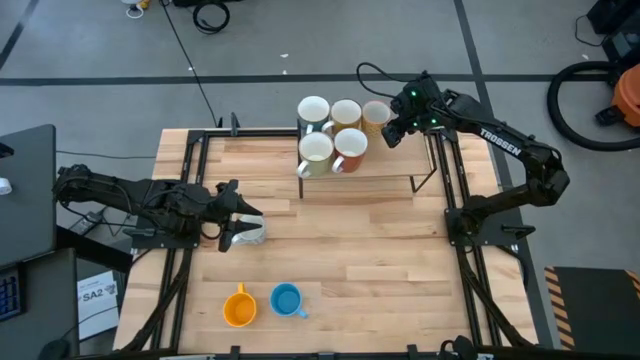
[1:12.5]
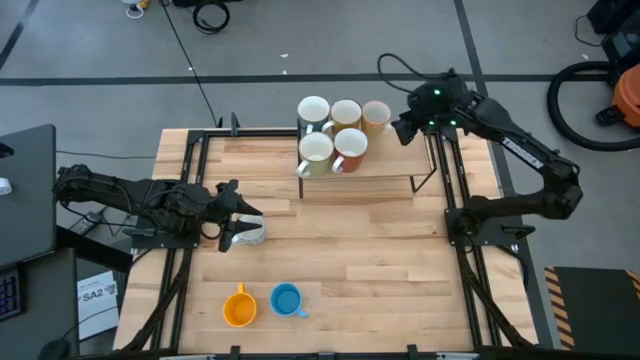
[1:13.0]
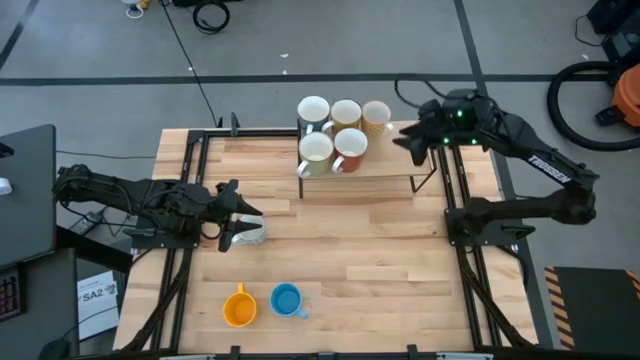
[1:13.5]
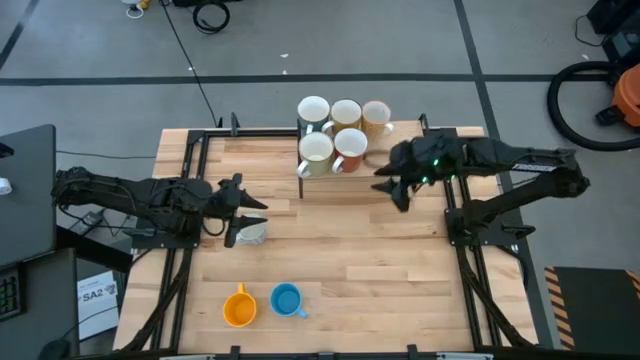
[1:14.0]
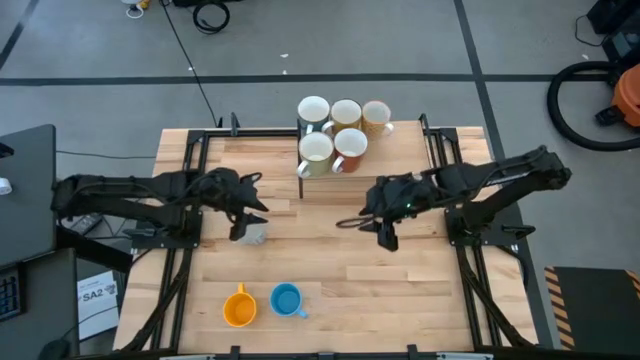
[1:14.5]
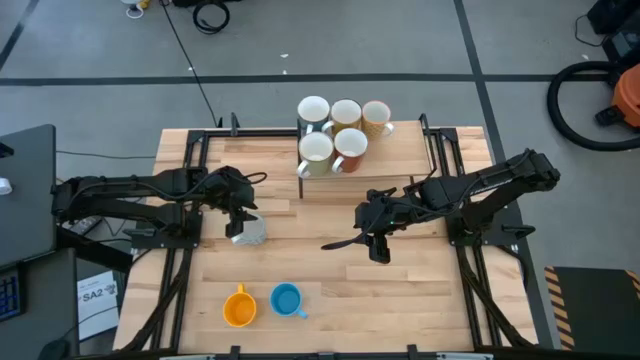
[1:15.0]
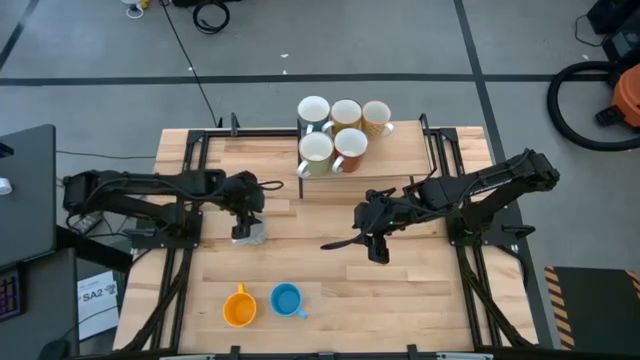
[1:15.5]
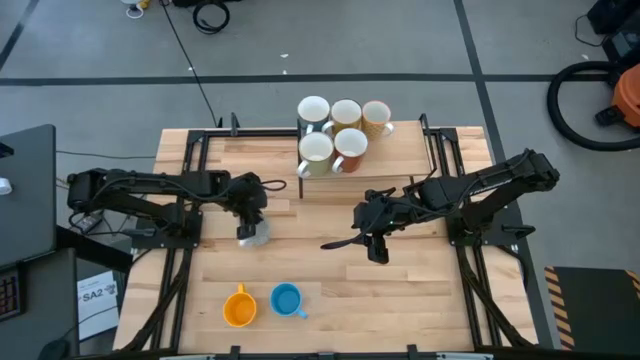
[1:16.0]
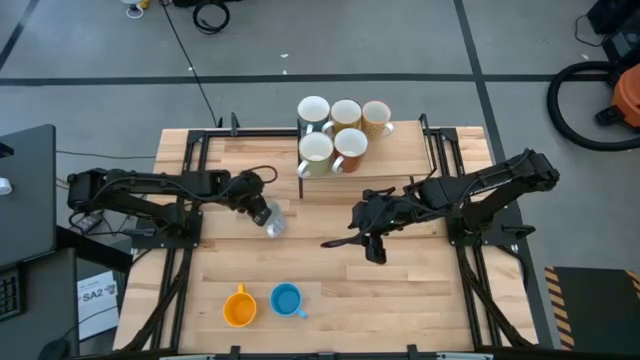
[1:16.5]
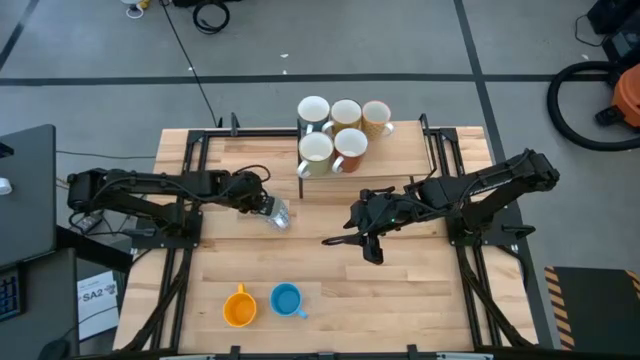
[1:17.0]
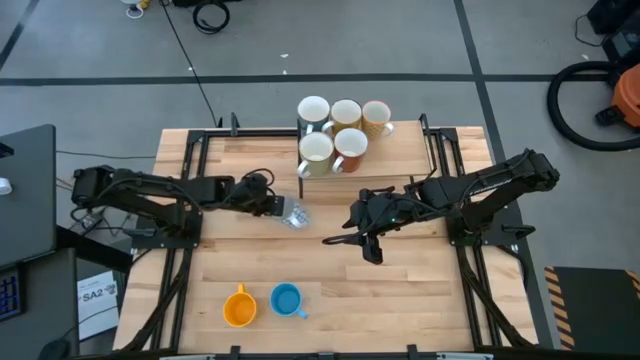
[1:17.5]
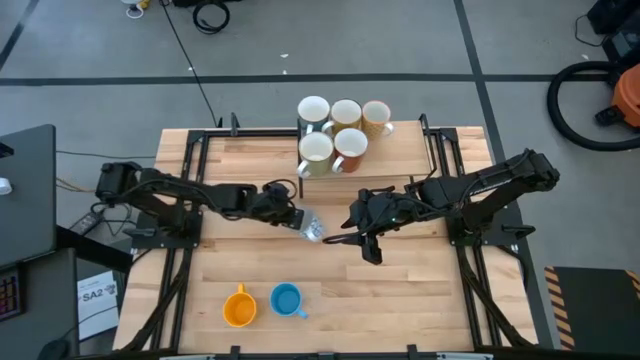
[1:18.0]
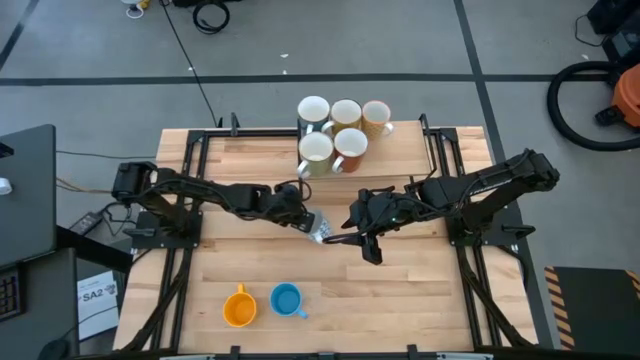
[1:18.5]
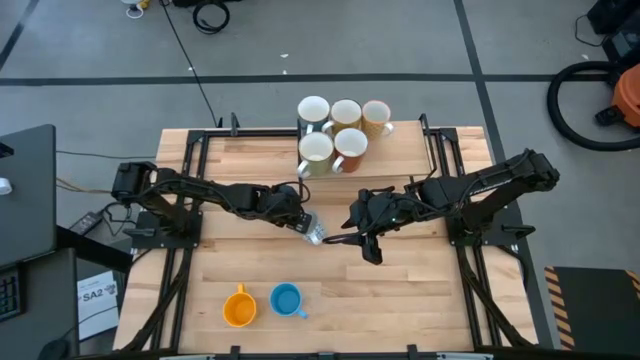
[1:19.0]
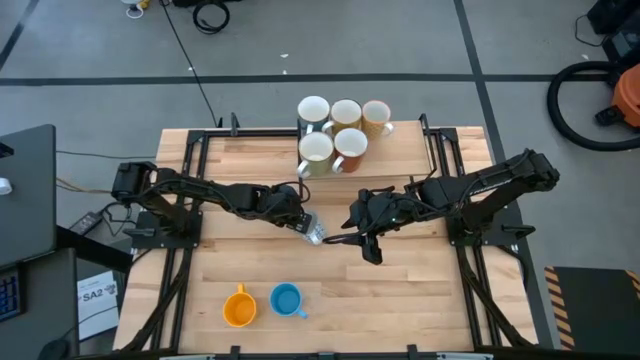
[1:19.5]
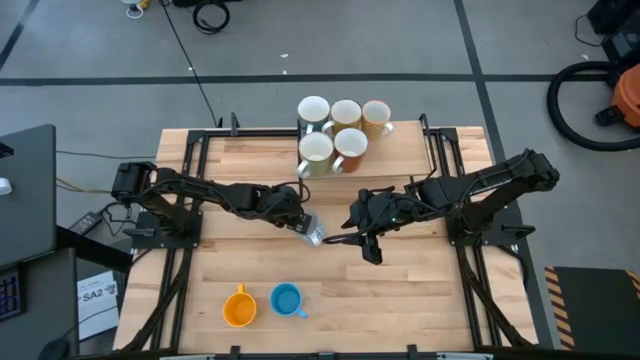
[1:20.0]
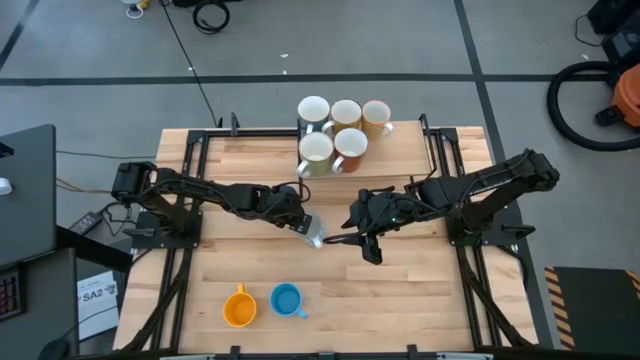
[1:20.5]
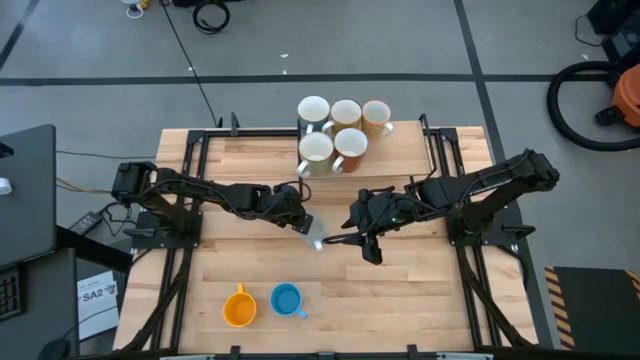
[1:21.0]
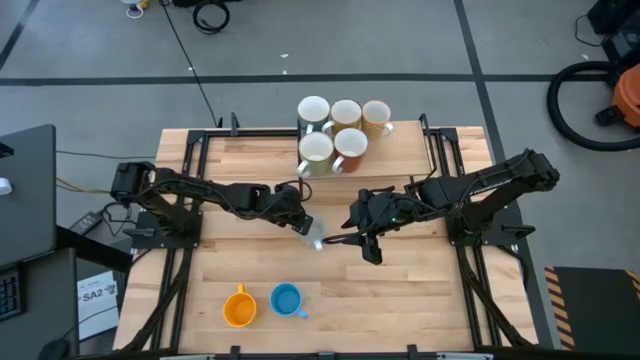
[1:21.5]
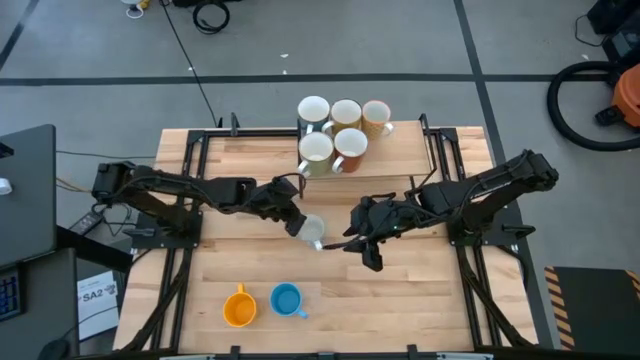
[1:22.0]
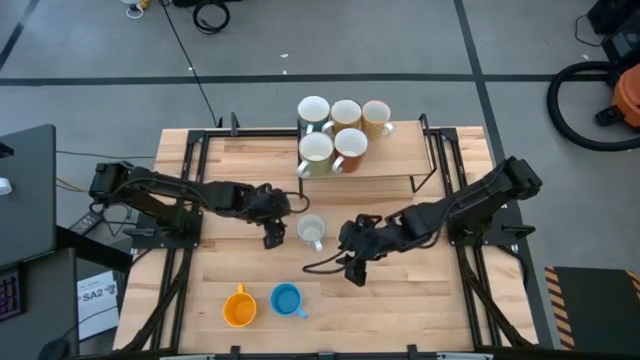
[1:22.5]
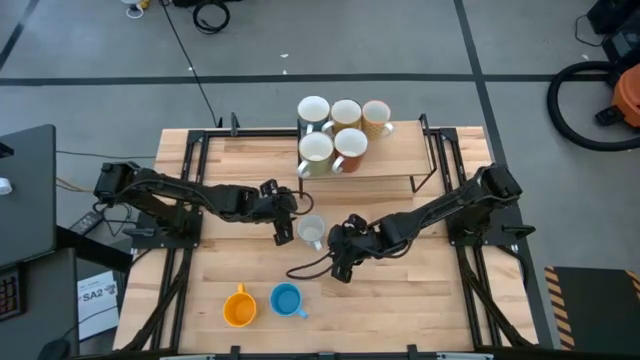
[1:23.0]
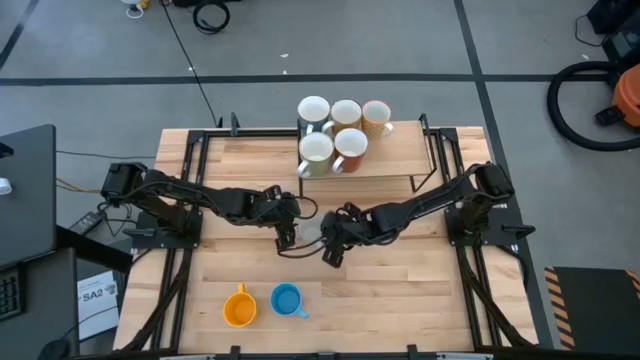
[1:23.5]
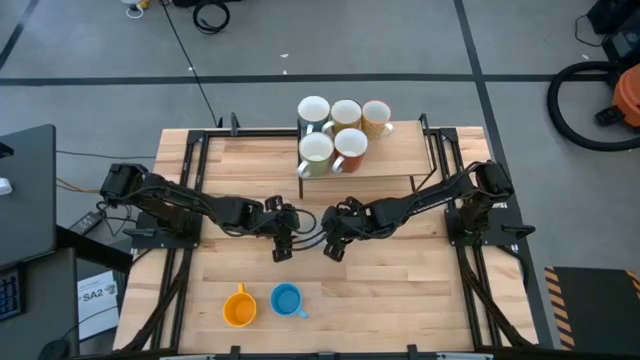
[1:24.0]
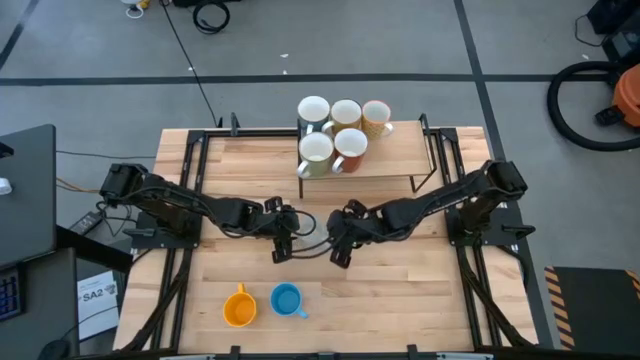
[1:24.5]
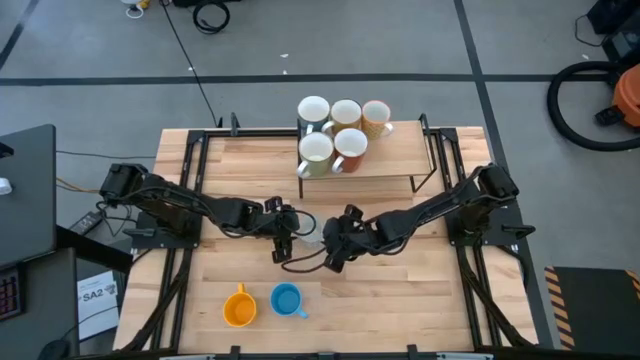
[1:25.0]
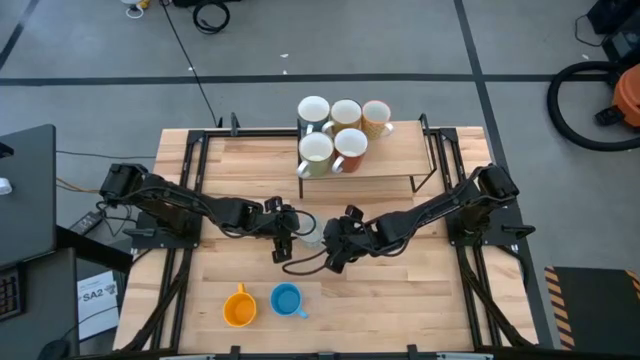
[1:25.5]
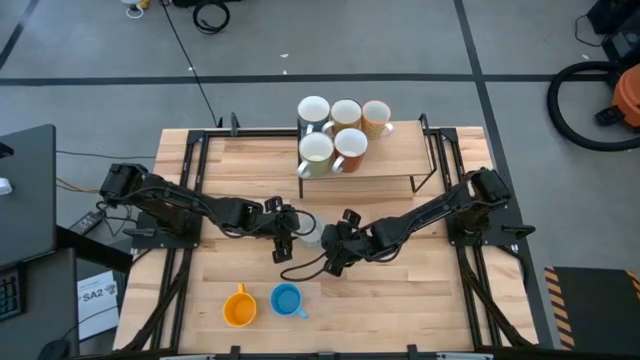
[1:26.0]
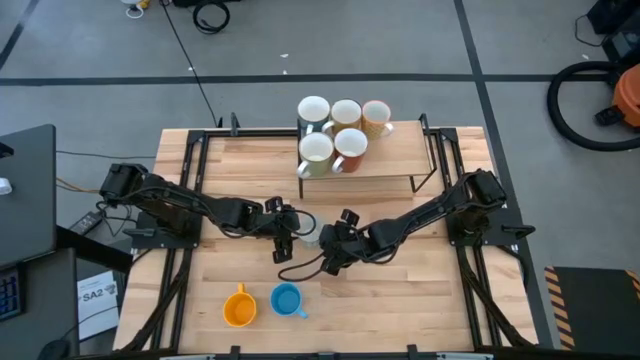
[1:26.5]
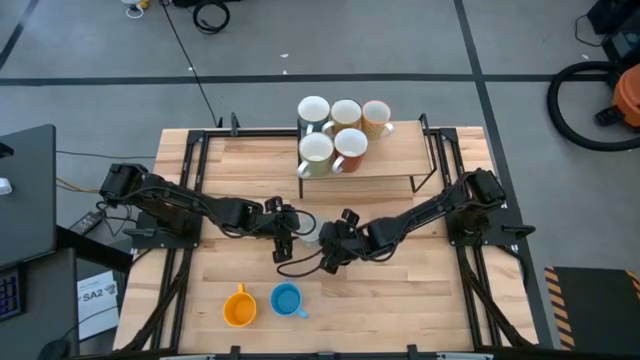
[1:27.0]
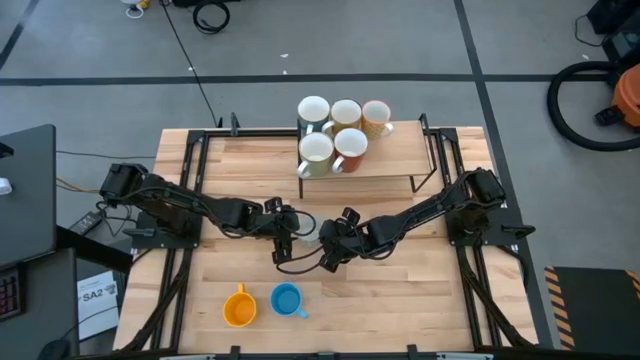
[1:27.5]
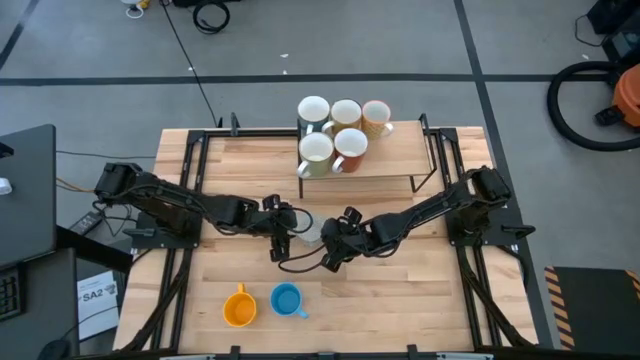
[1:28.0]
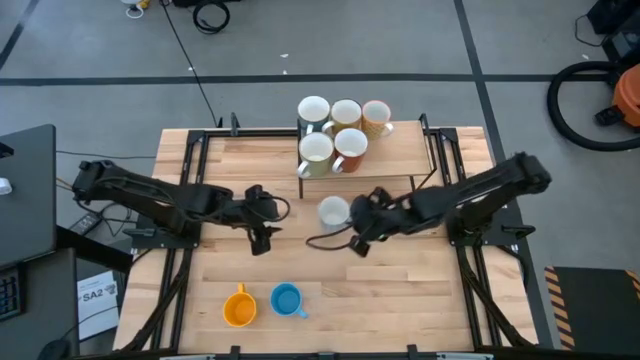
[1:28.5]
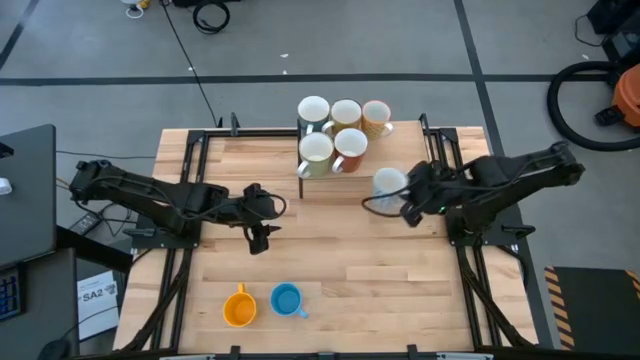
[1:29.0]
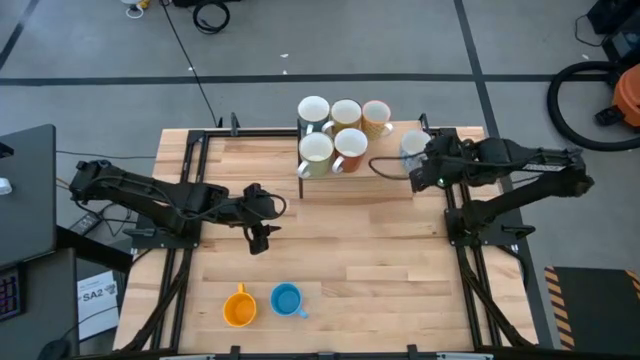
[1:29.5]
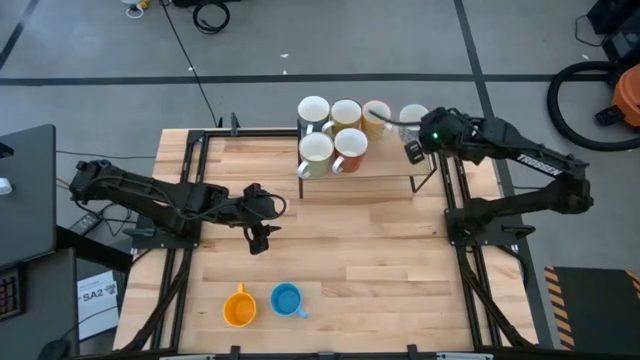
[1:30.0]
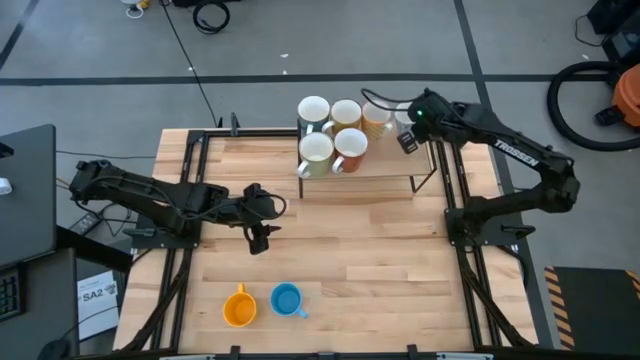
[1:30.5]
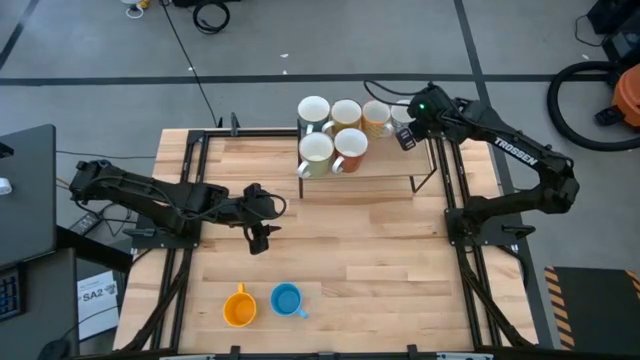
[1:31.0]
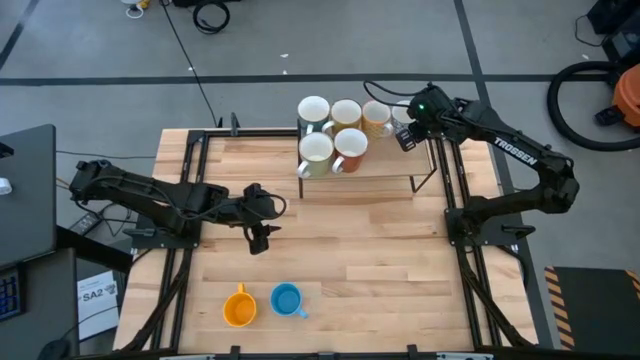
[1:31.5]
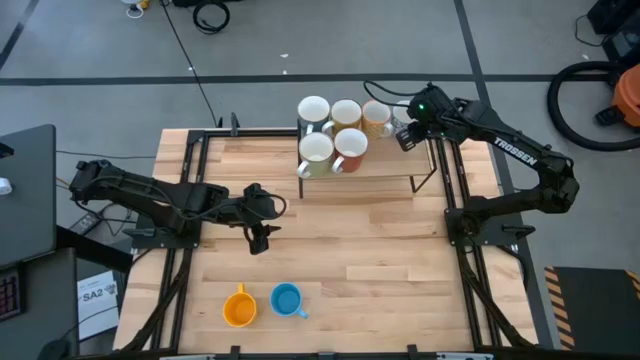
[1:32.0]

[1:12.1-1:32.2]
Task: Place coffee mugs
Put the blue patterned mug on the shelf

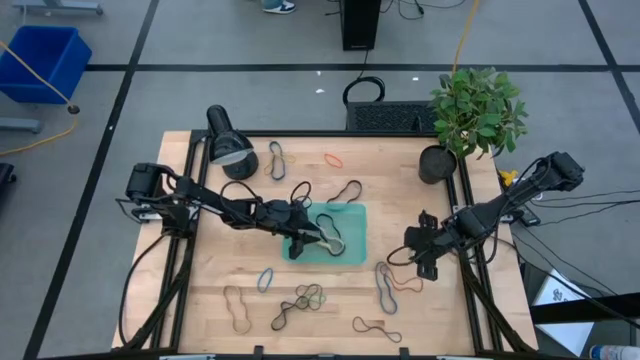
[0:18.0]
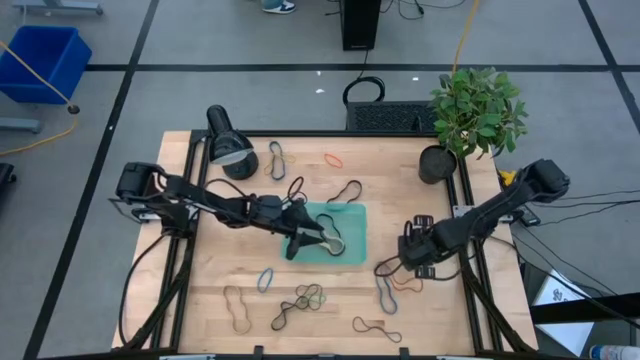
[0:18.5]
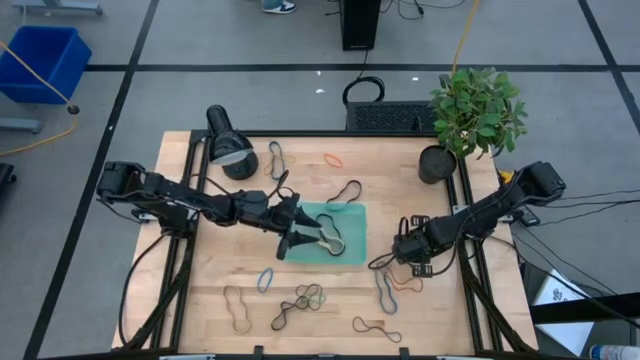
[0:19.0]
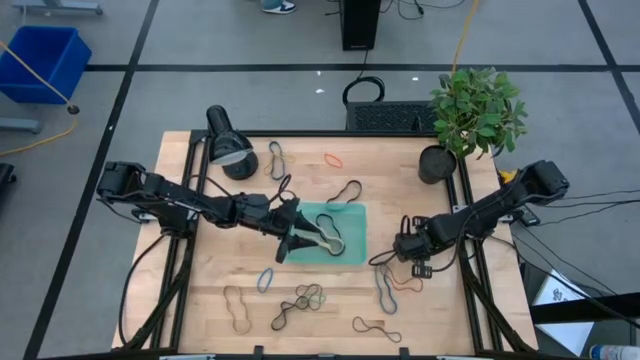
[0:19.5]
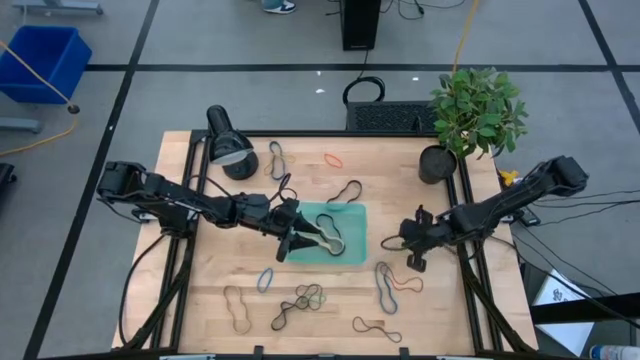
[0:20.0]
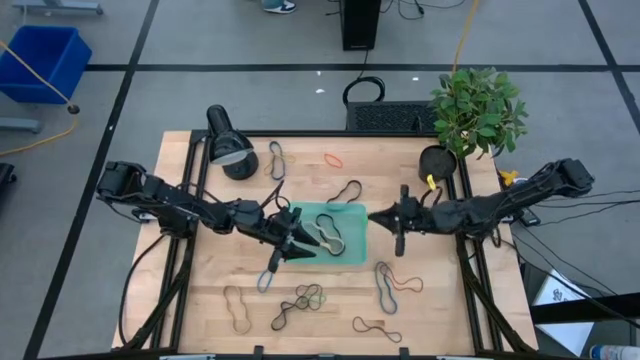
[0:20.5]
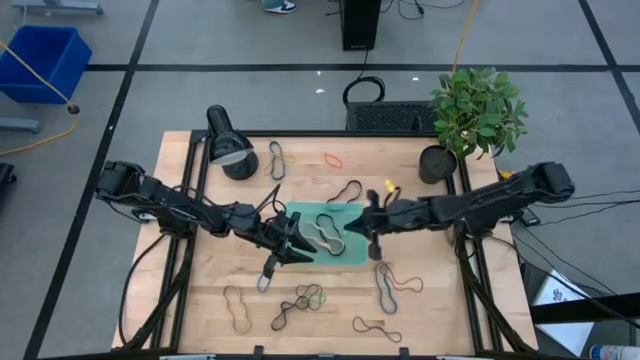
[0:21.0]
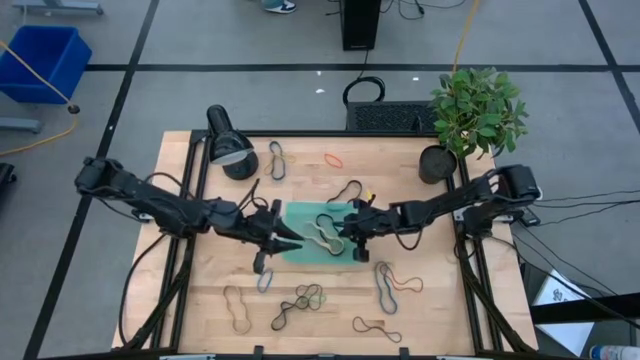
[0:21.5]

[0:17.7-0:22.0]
Task: Pick and place rubber bands into bin
Put the green rubber band into the green bin
